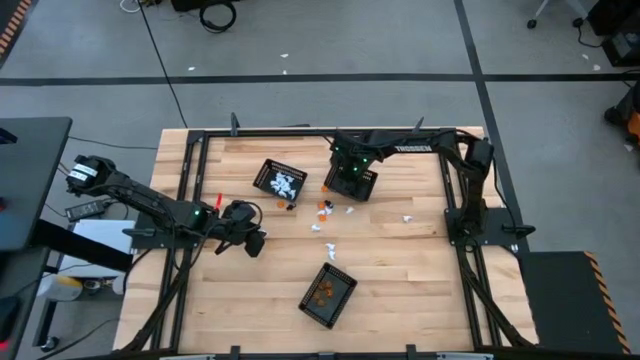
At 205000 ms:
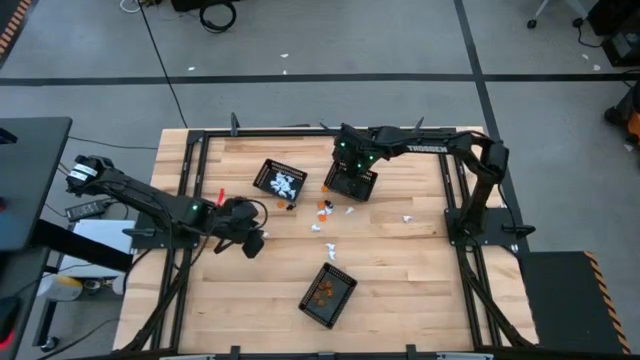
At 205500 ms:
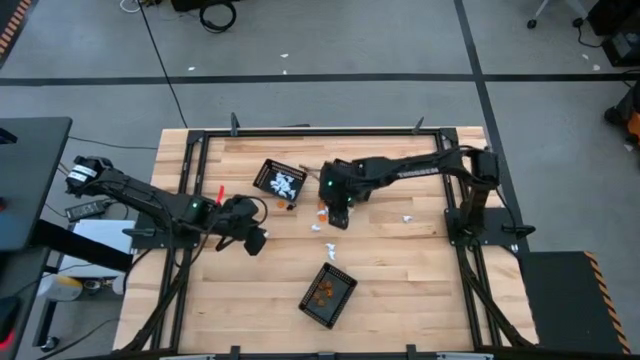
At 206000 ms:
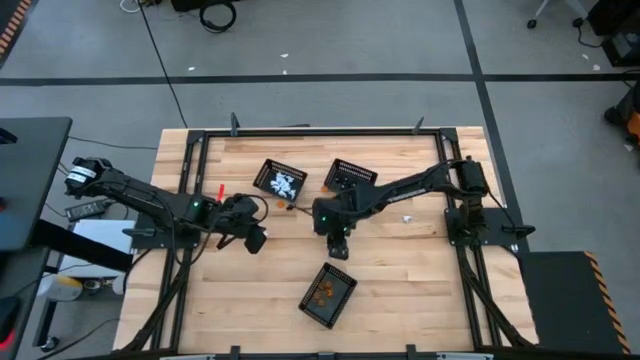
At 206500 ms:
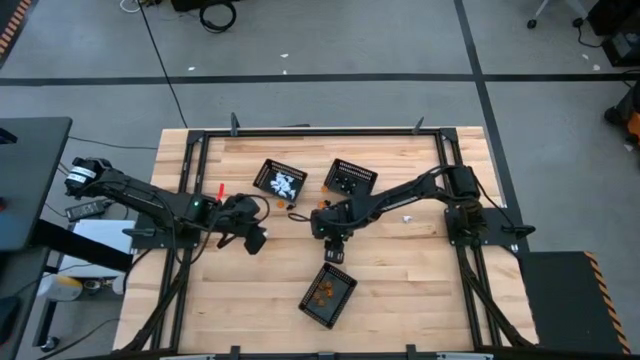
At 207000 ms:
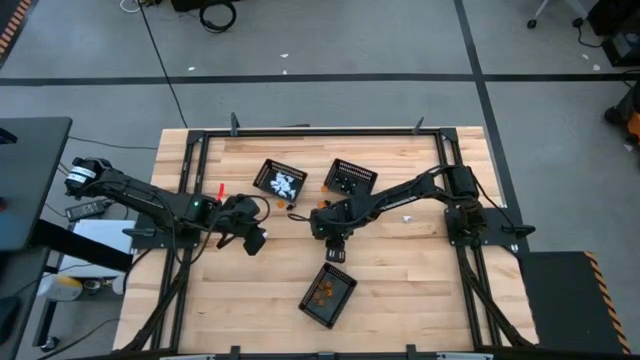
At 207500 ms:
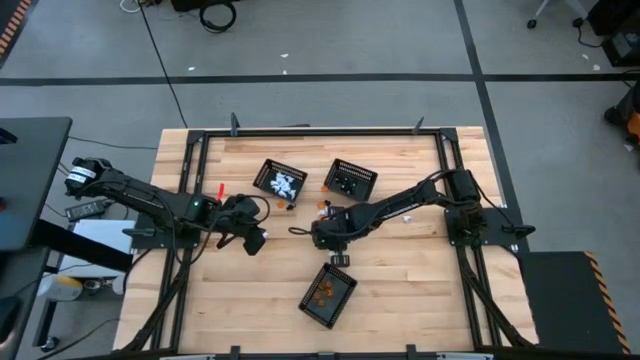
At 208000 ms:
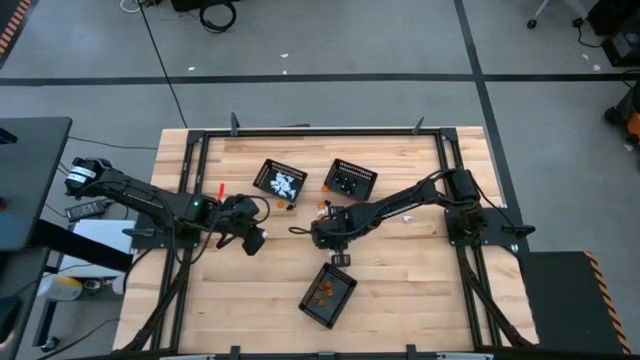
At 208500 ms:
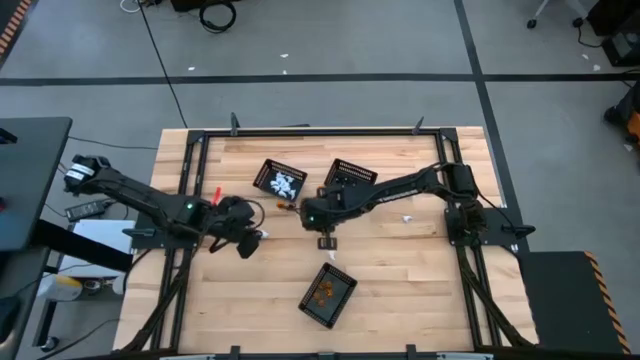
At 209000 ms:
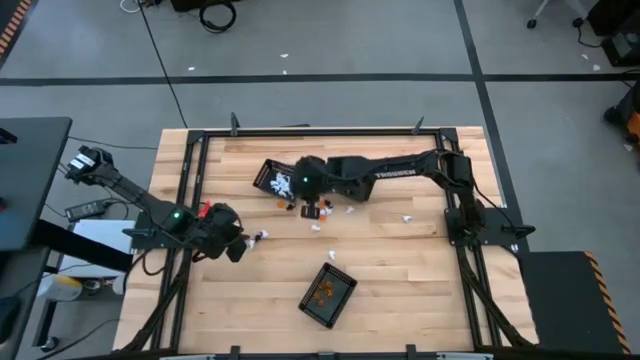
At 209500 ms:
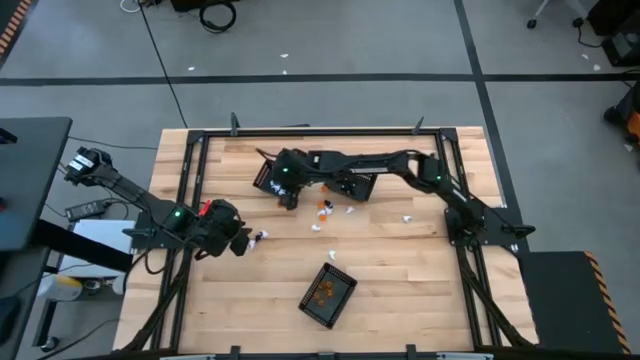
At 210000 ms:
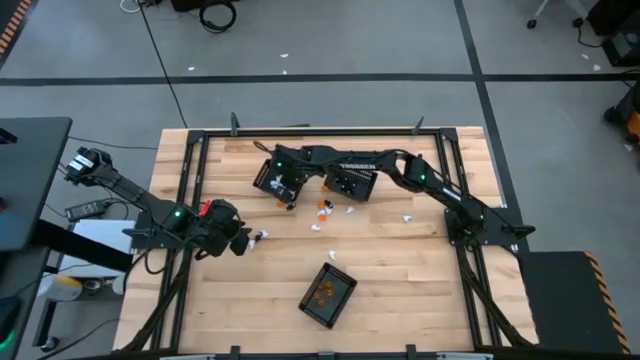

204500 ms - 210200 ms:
Task: Sort Halloween decoration
Put the white ghost toy into the top left black basket

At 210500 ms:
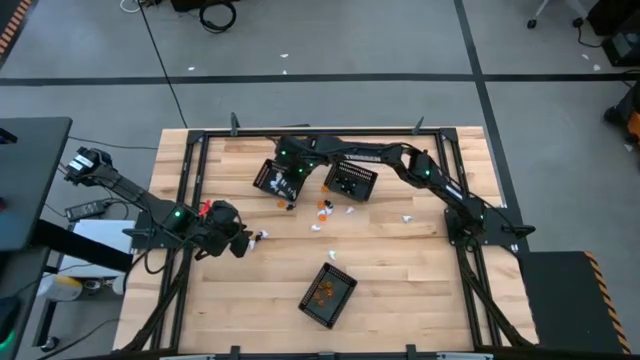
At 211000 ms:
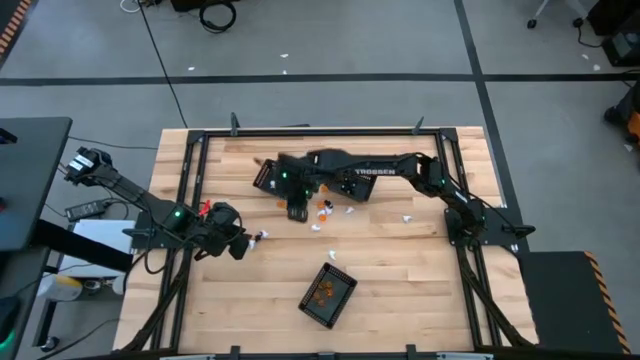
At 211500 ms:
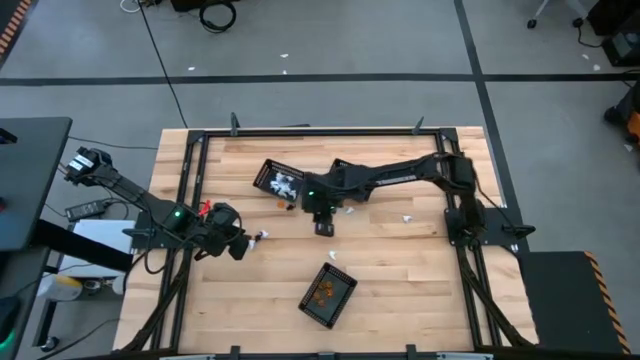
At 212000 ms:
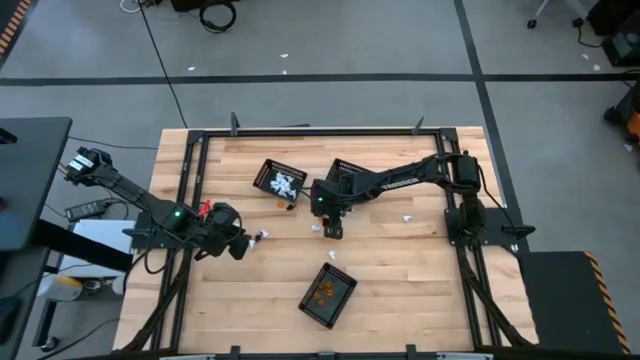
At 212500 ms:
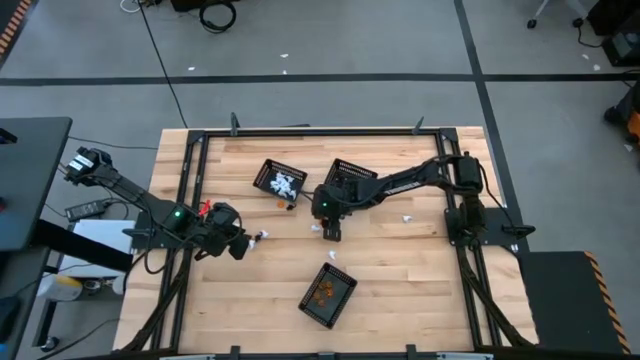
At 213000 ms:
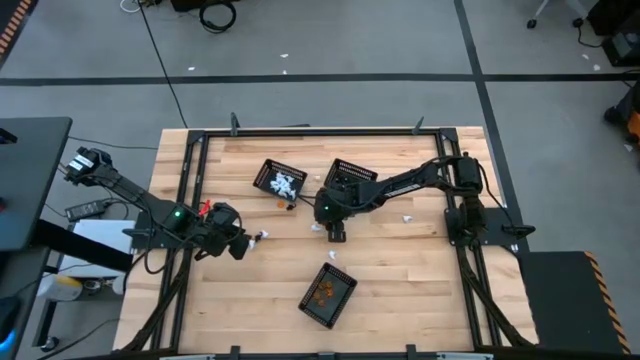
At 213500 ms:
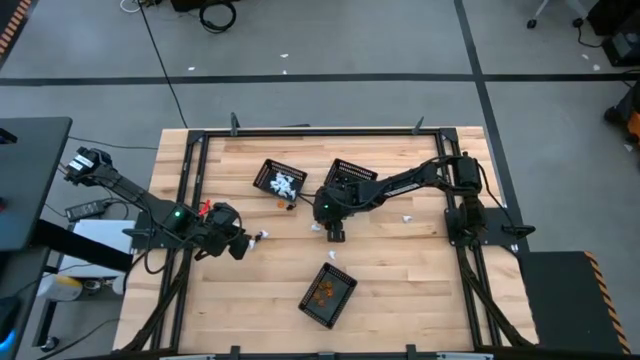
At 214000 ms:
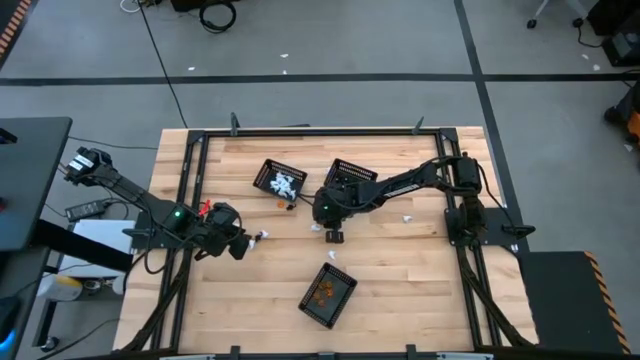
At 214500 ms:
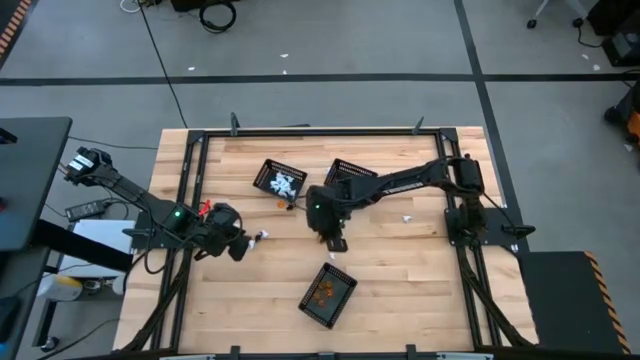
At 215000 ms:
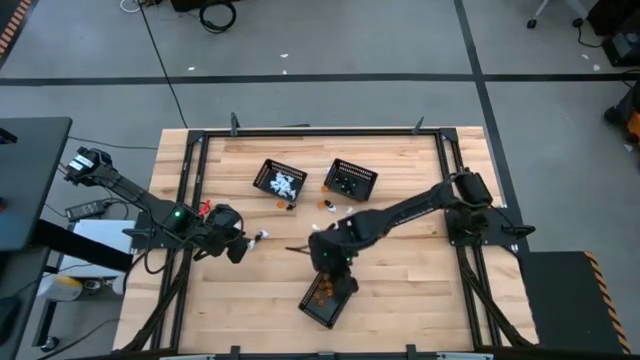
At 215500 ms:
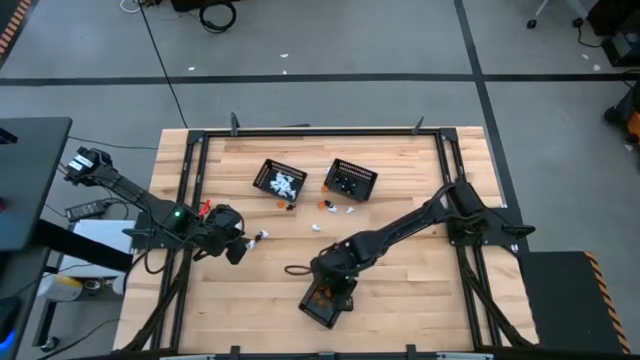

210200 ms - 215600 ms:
Put the orange pumpkin toy into the bottom black basket

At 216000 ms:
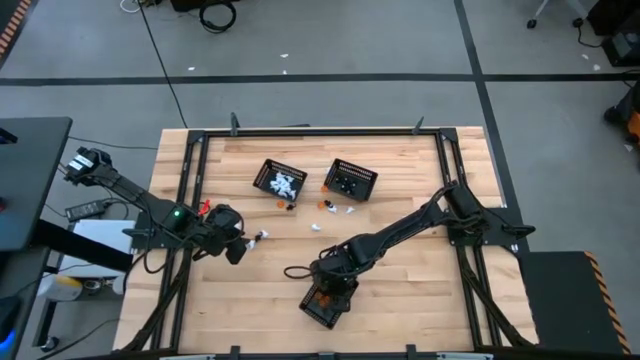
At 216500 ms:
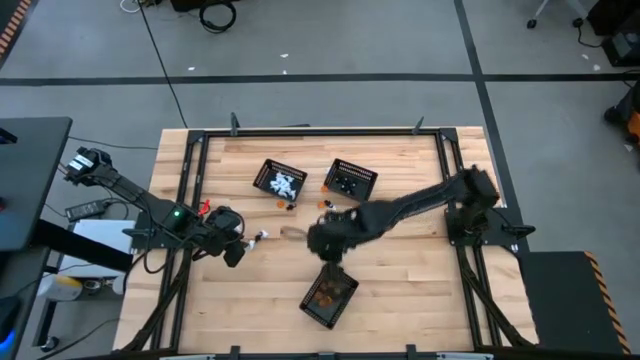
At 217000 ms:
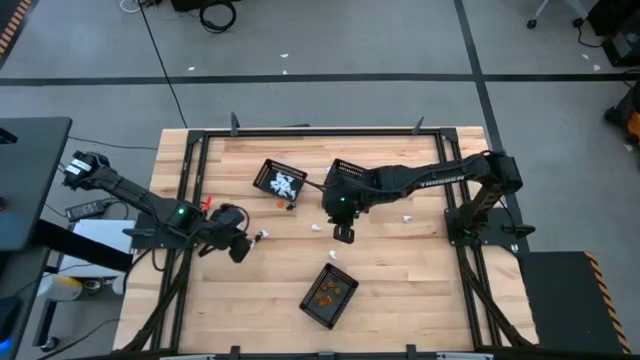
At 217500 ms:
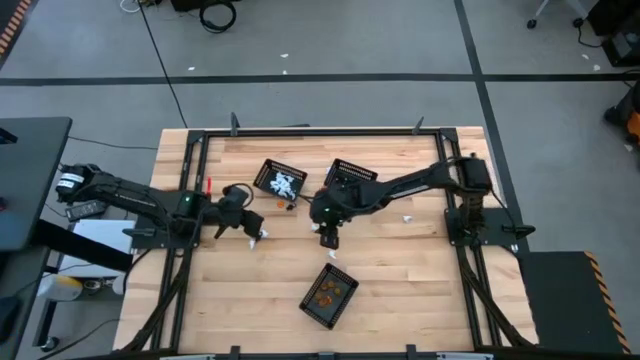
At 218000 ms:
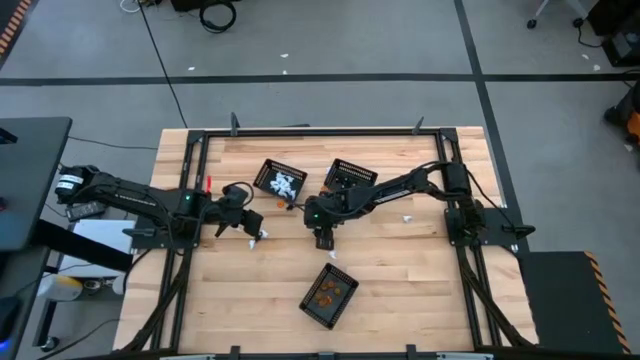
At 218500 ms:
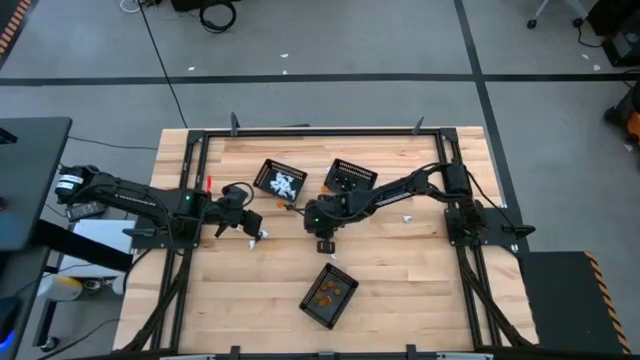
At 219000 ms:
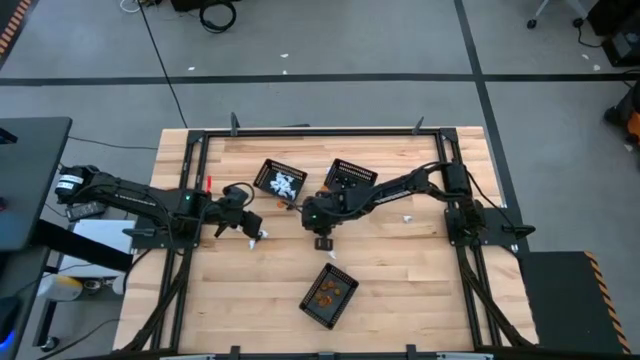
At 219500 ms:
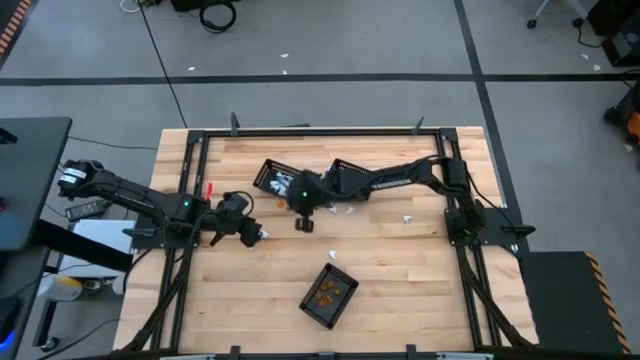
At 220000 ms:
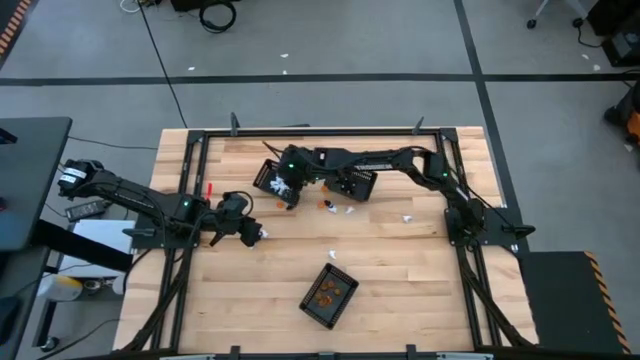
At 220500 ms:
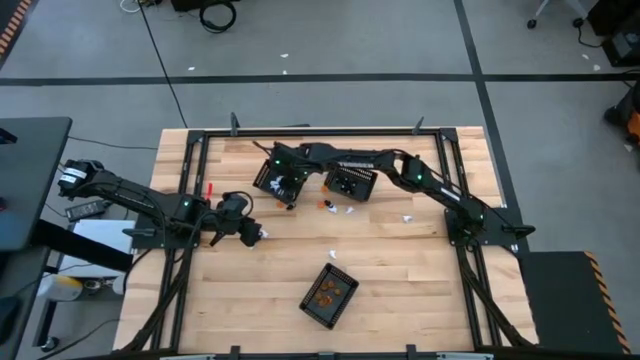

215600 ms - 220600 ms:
Put the white ghost toy into the top left black basket

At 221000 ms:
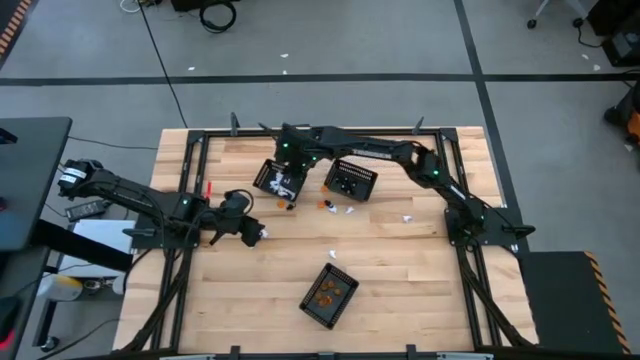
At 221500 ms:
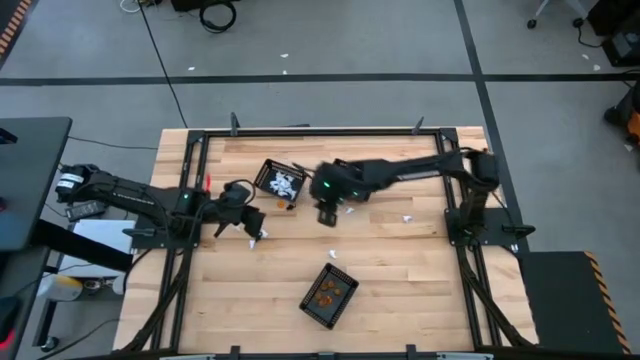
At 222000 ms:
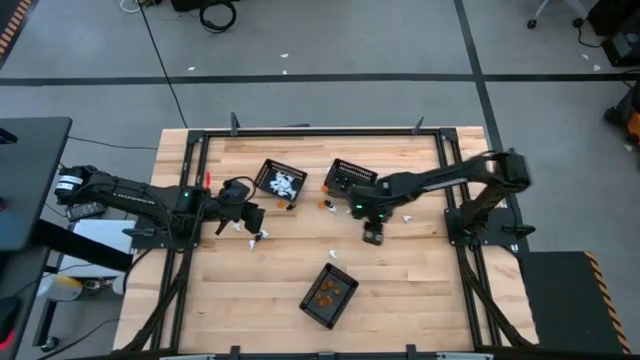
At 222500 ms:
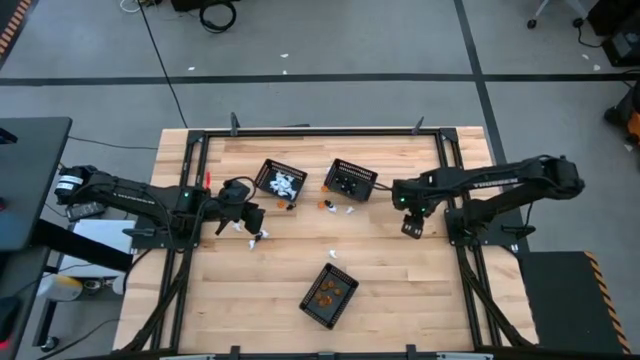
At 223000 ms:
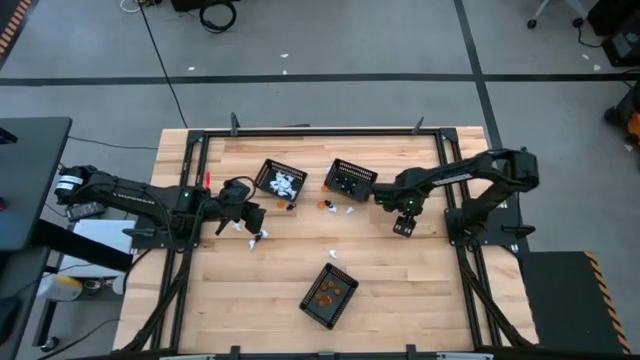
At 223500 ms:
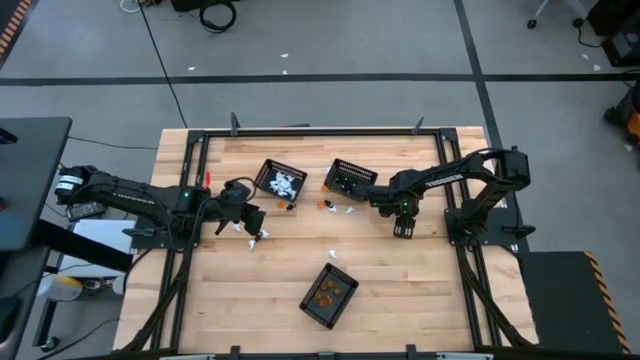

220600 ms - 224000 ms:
Put the white ghost toy into the top left black basket

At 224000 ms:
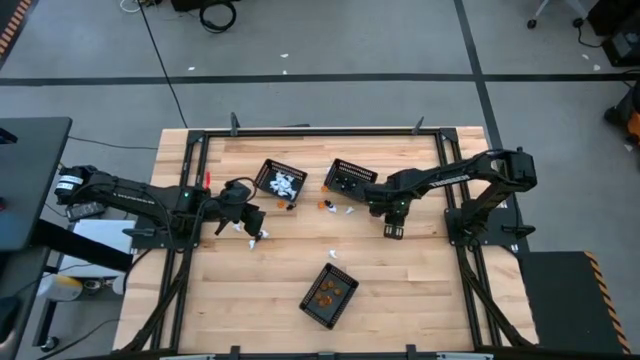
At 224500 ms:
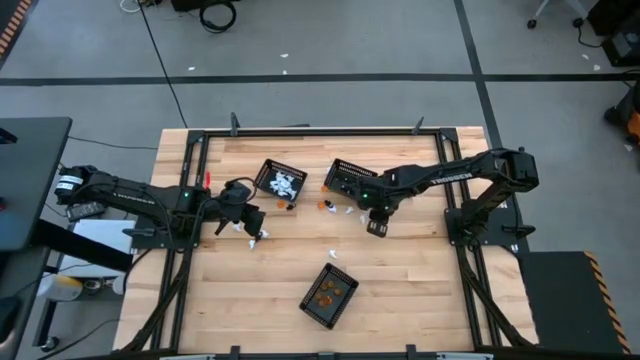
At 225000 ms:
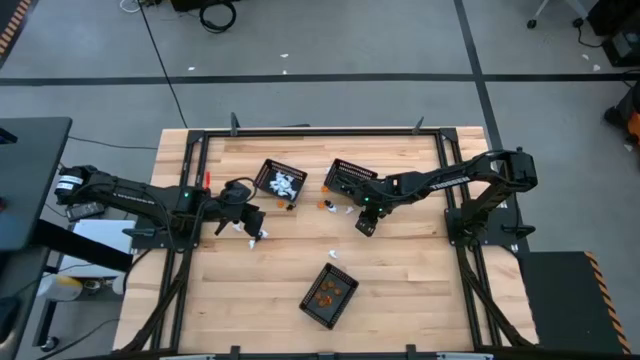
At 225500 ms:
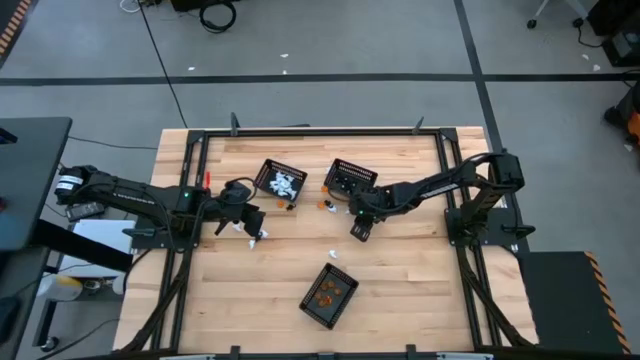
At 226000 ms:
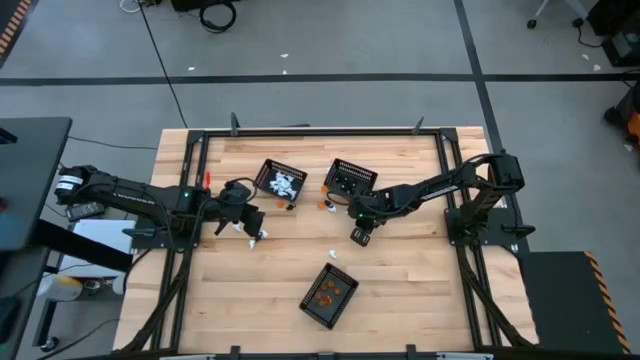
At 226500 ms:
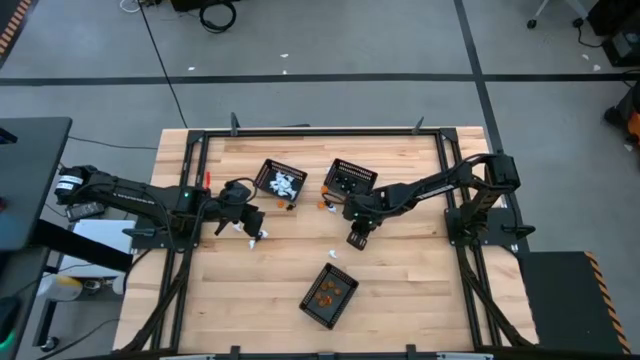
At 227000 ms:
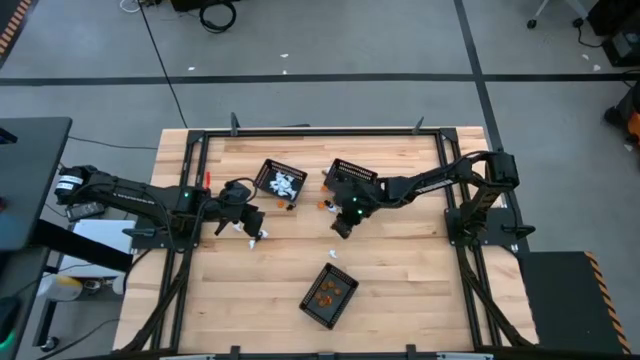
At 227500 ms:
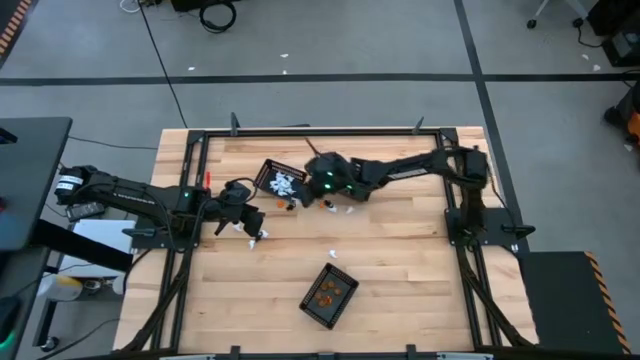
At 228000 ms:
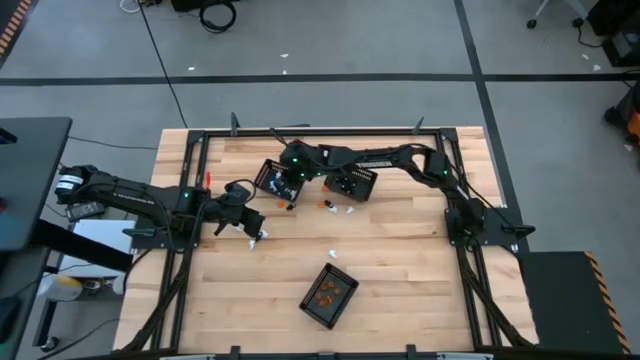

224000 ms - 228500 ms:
Put the white ghost toy into the top left black basket
